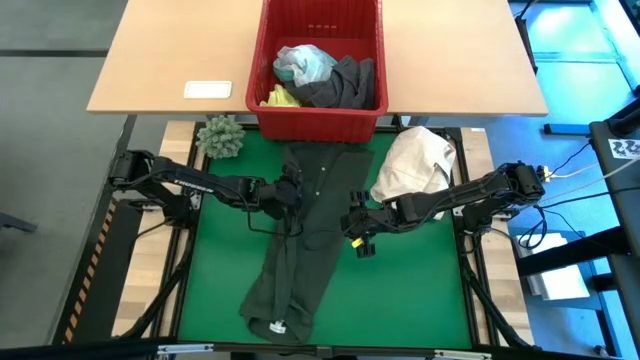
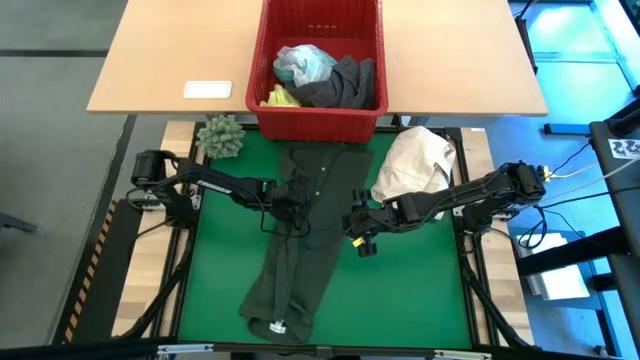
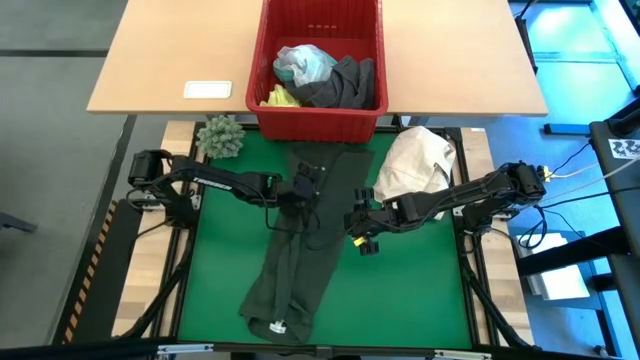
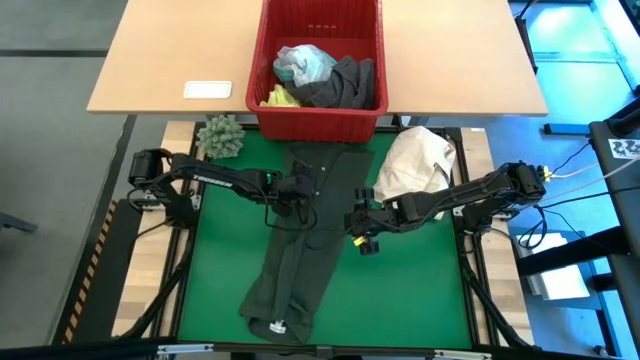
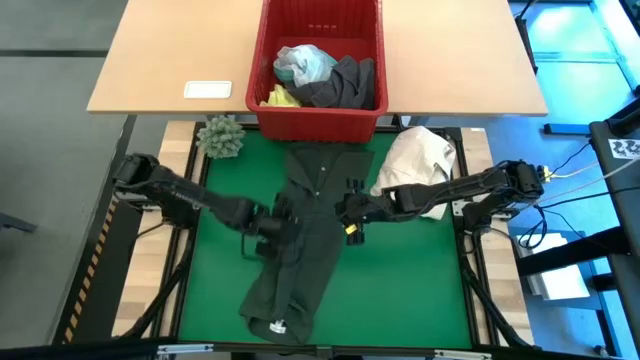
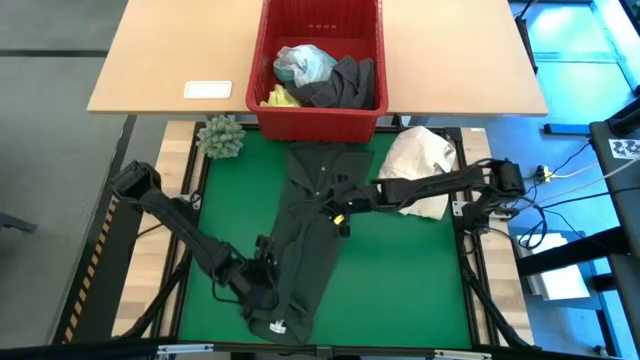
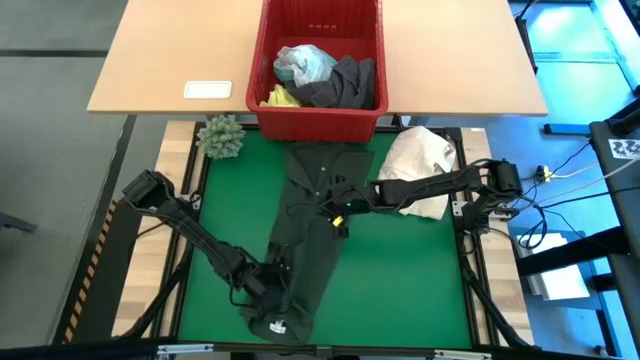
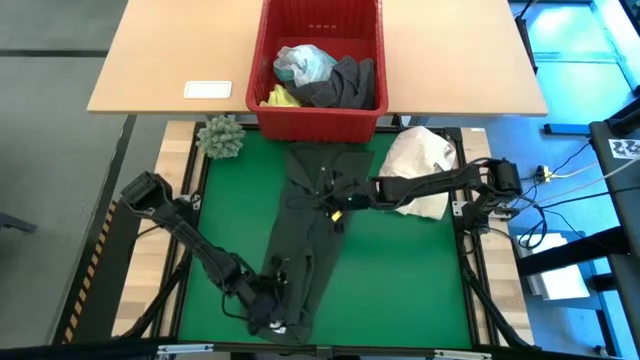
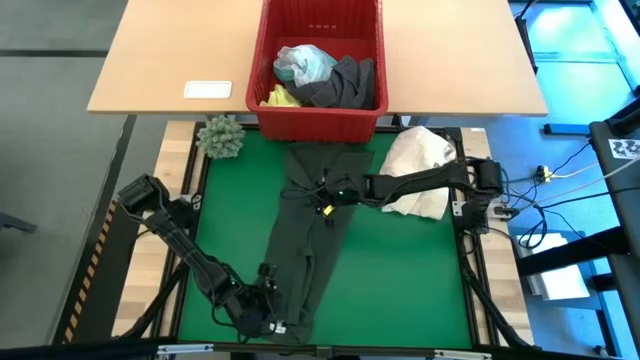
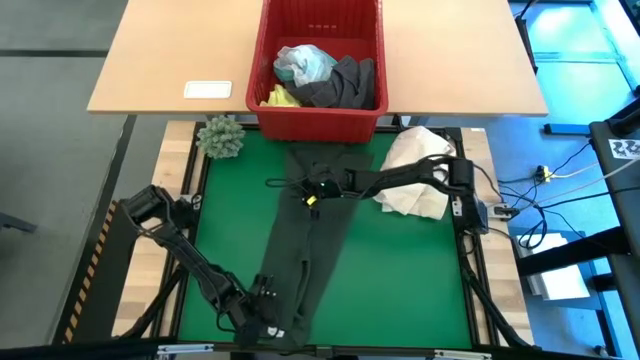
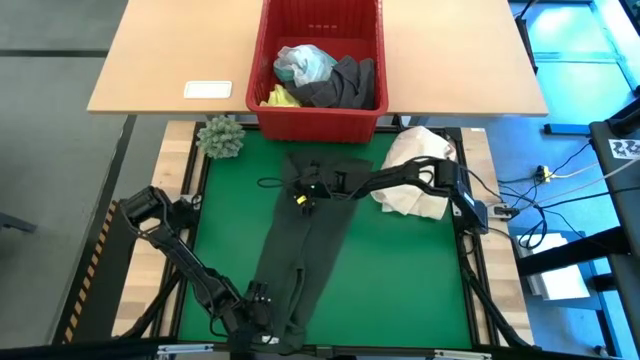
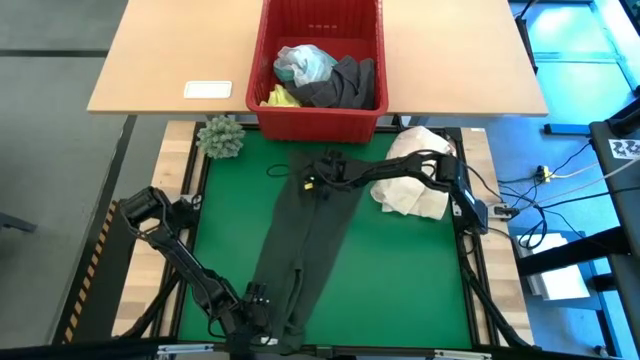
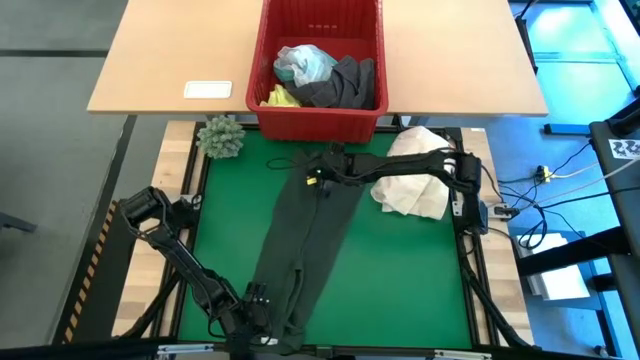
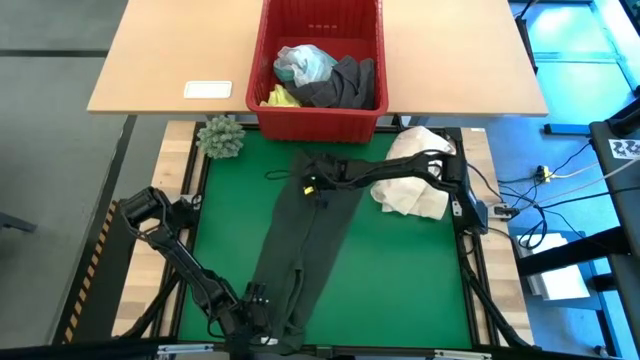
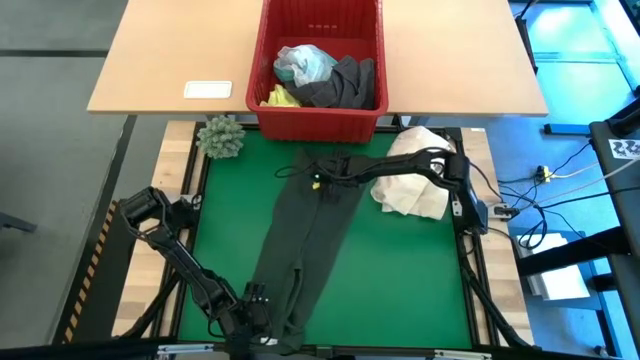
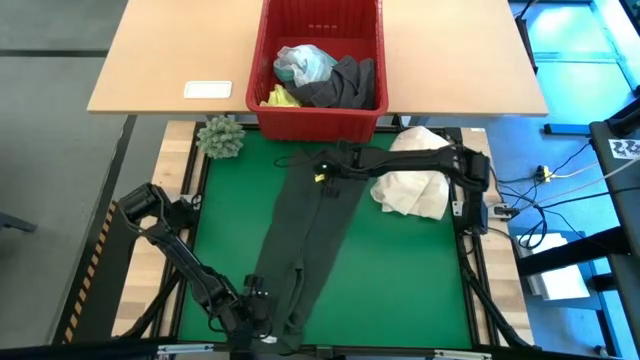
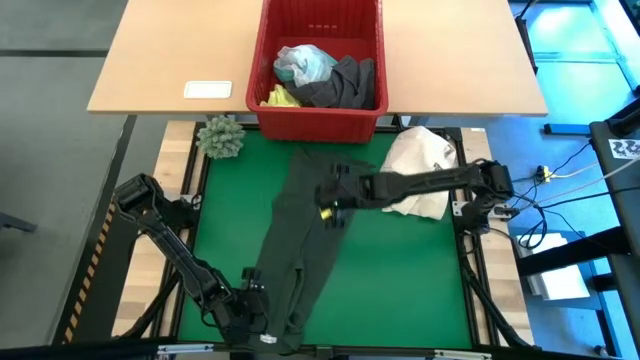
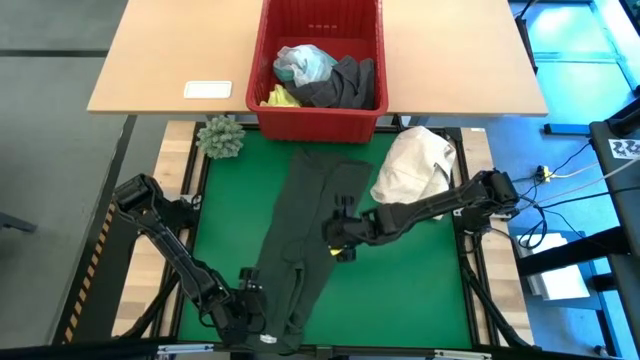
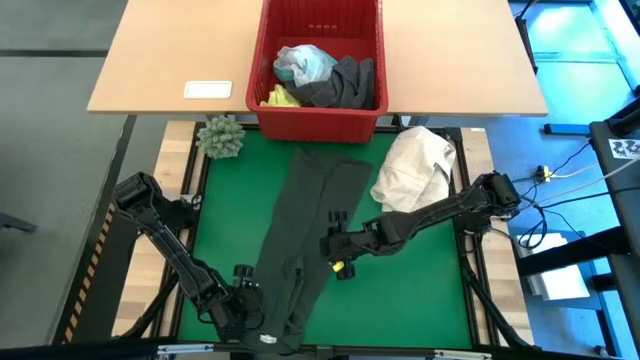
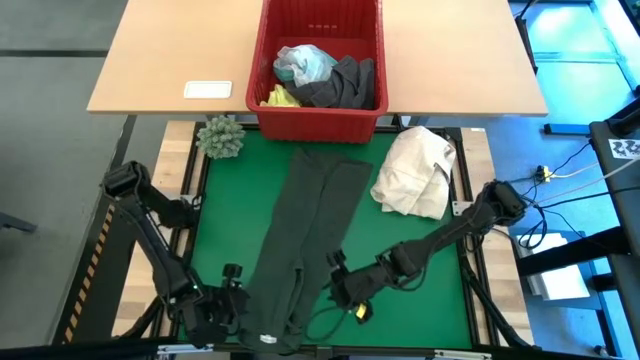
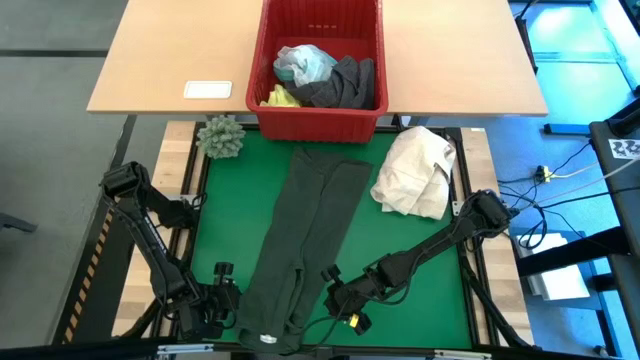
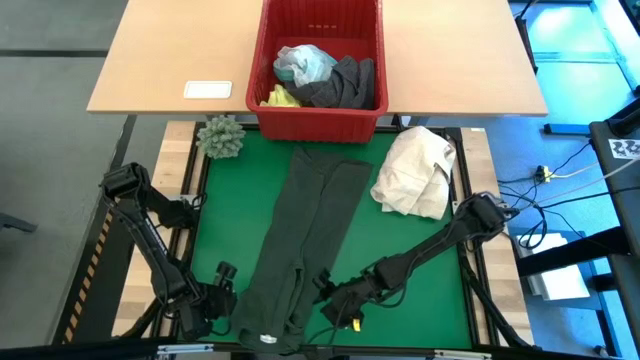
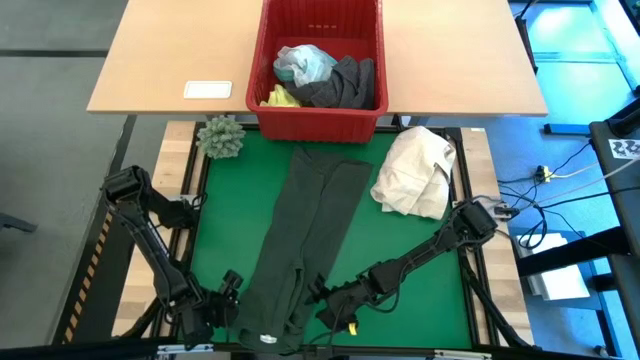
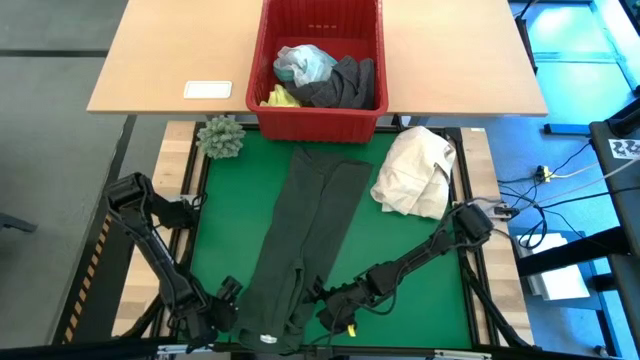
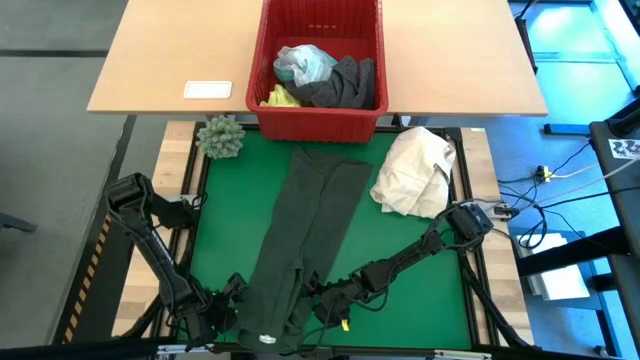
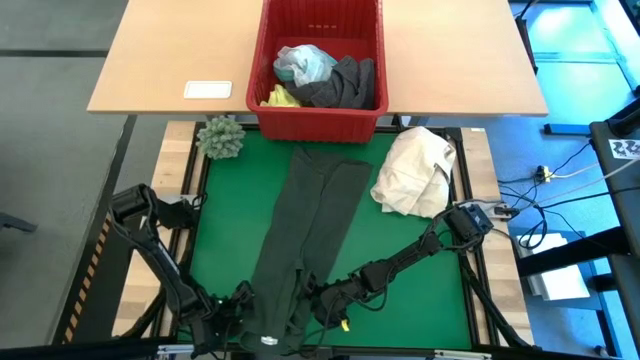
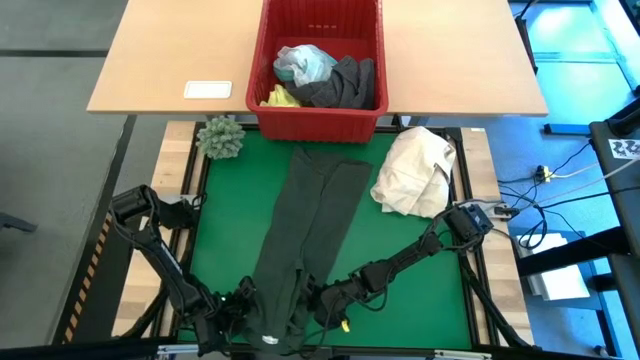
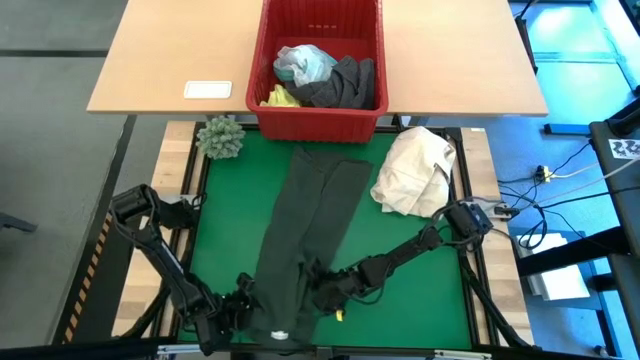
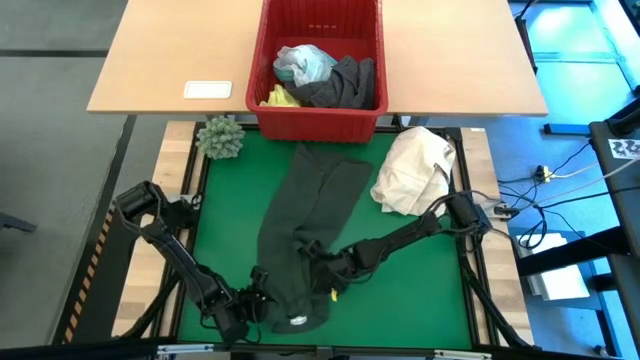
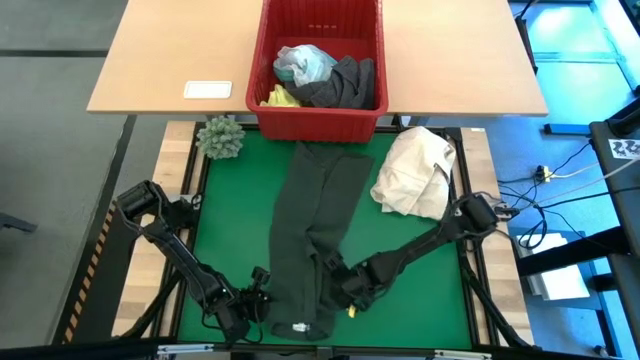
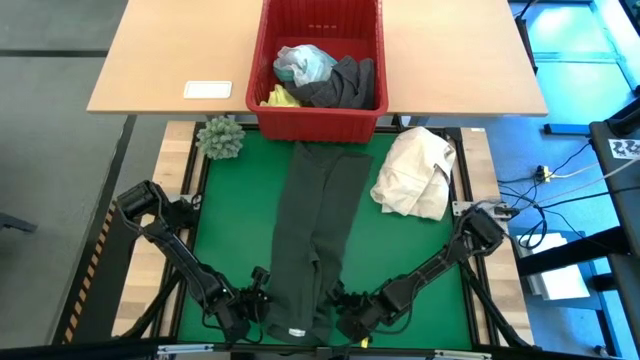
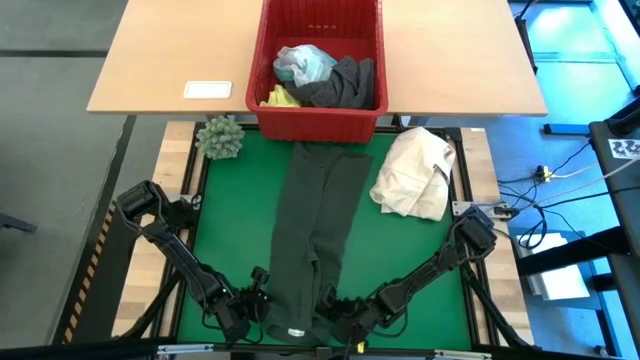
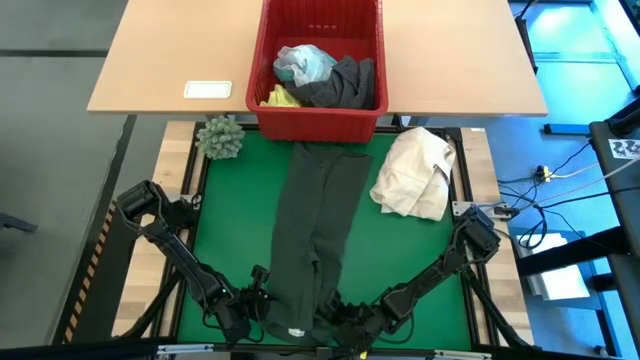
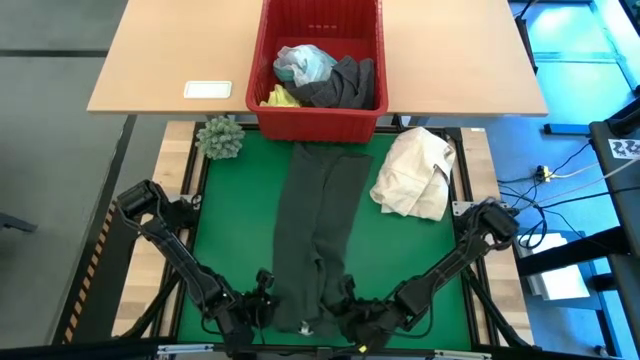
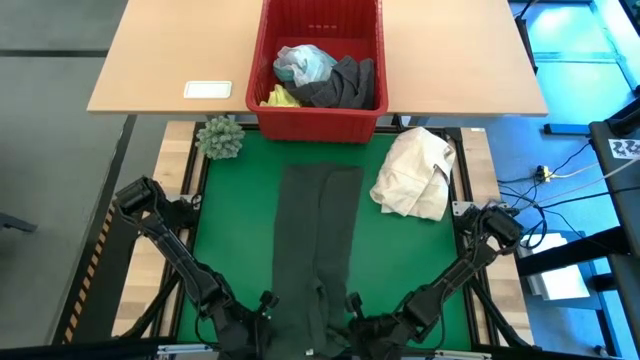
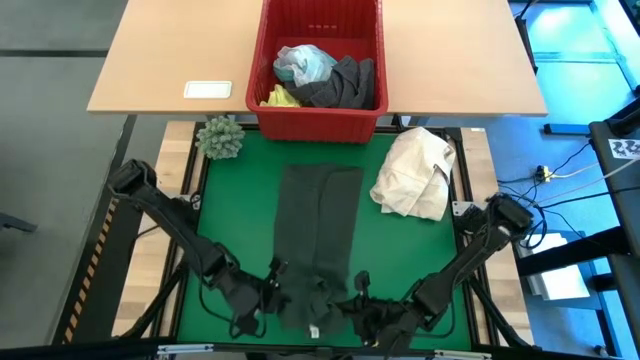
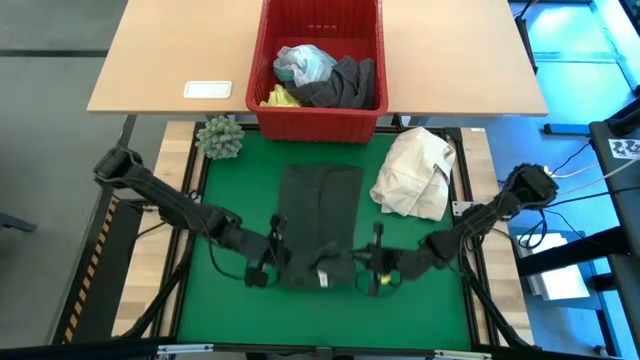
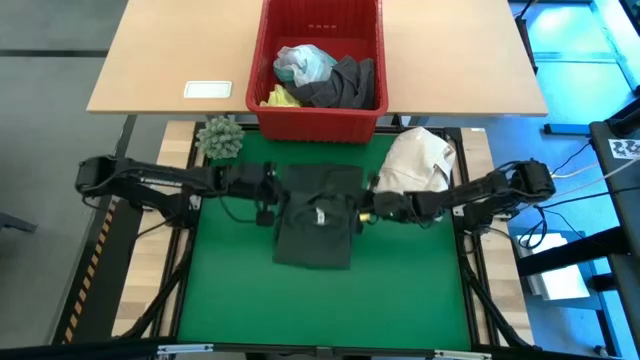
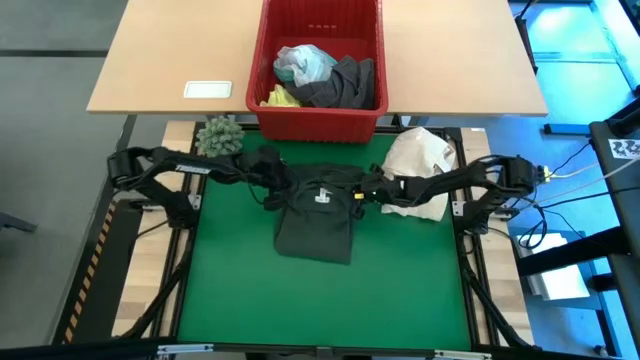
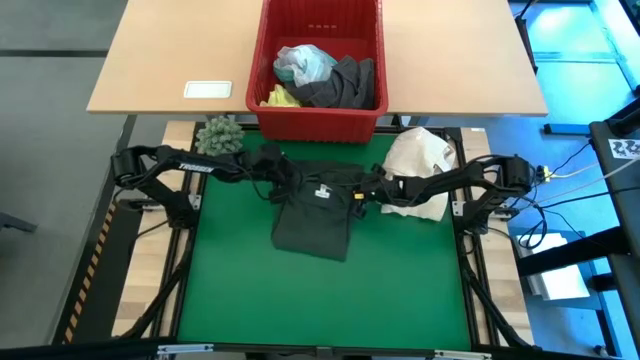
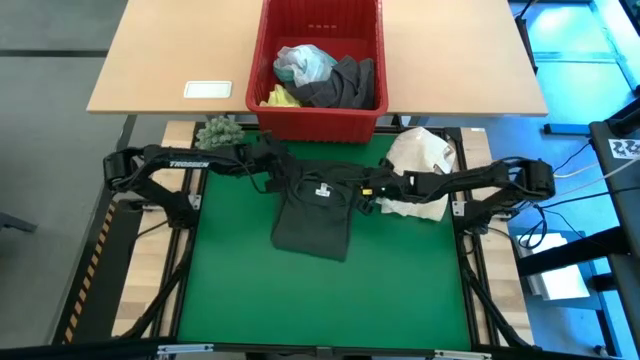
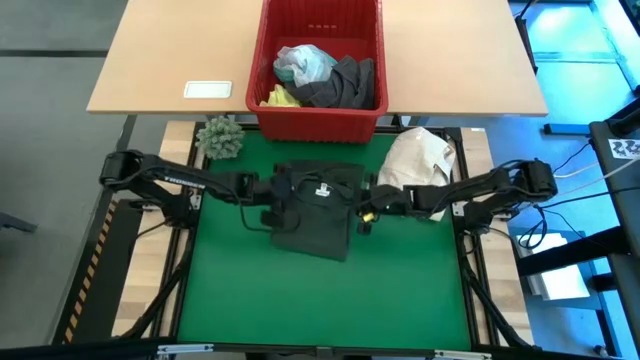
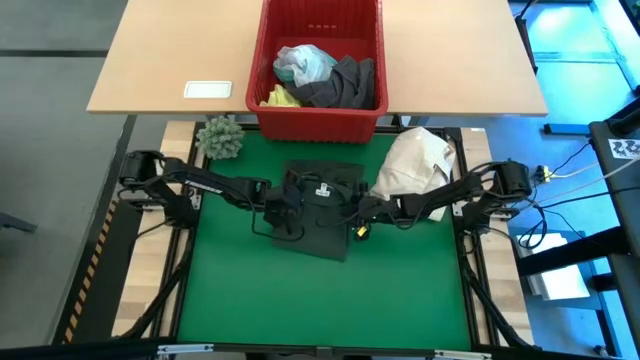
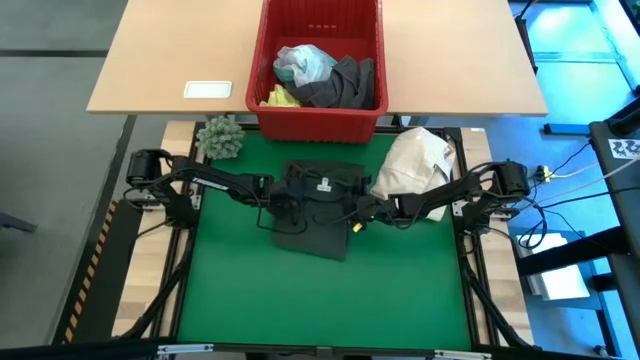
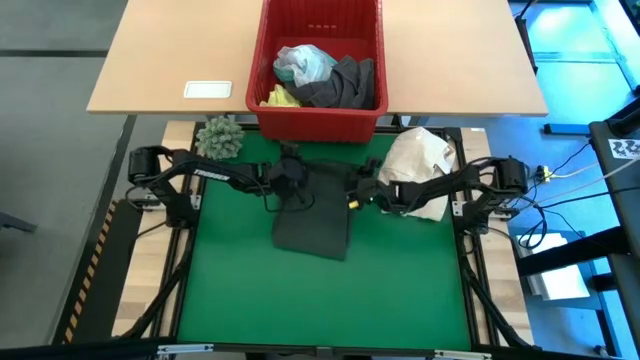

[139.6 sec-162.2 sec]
Task: Fold Laundry from Bin
Fold the dark green polo
